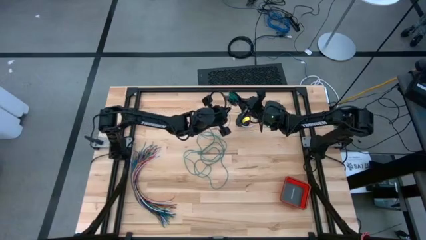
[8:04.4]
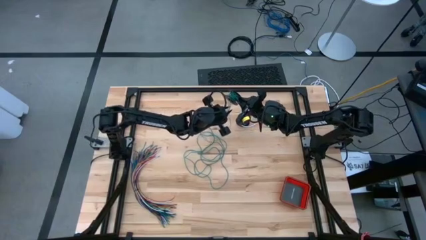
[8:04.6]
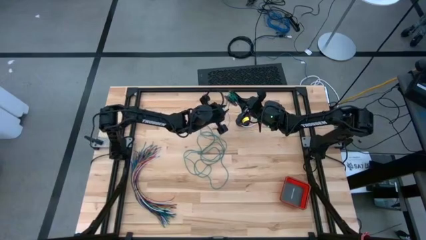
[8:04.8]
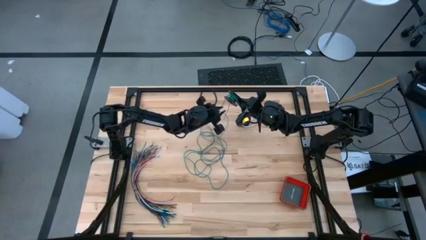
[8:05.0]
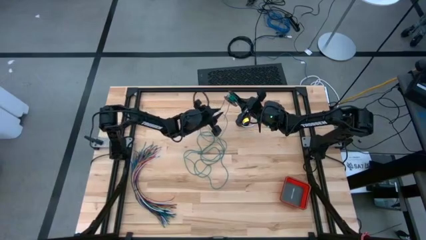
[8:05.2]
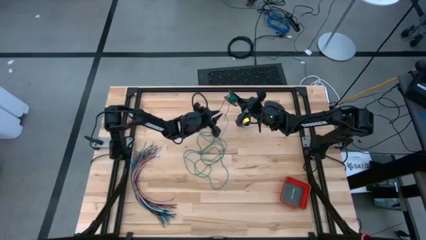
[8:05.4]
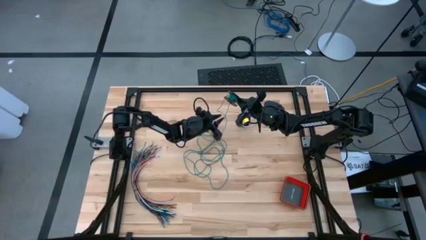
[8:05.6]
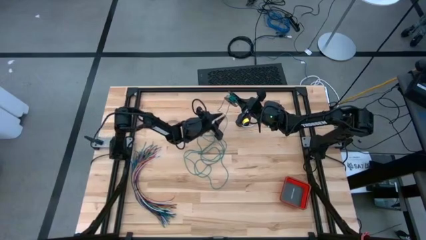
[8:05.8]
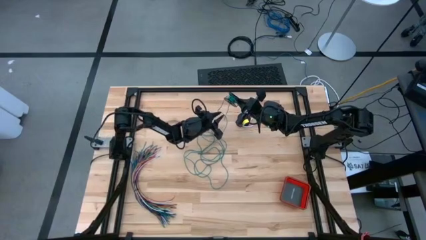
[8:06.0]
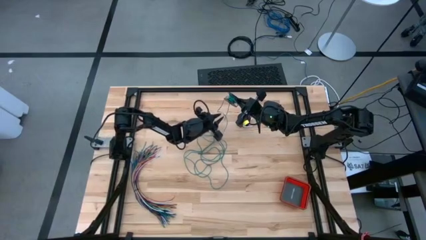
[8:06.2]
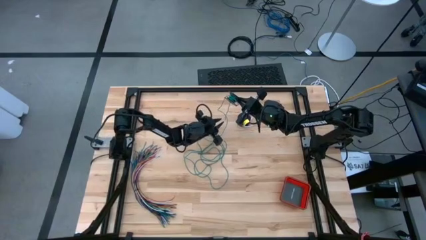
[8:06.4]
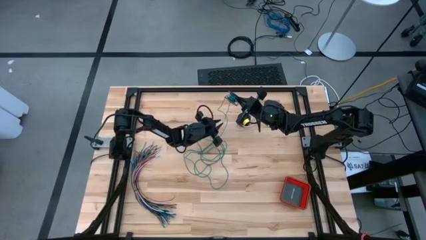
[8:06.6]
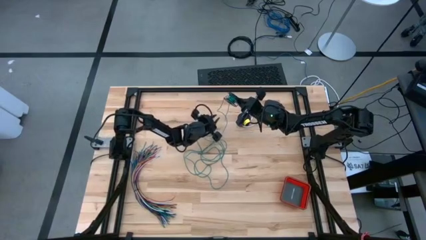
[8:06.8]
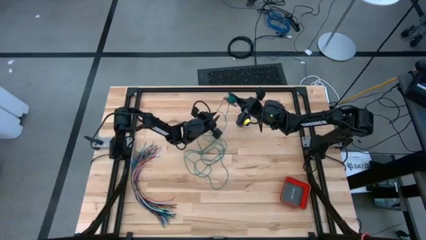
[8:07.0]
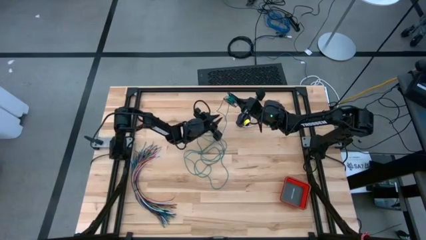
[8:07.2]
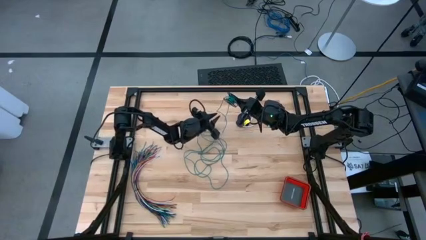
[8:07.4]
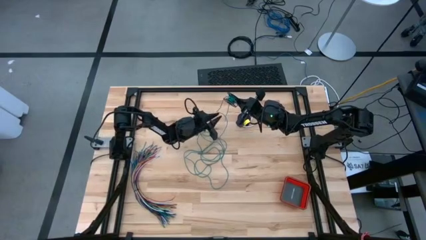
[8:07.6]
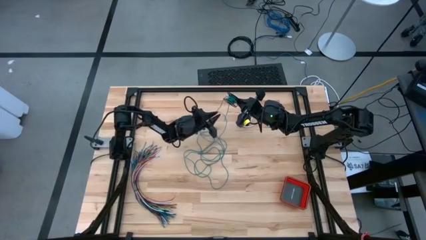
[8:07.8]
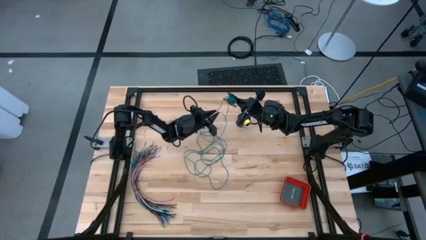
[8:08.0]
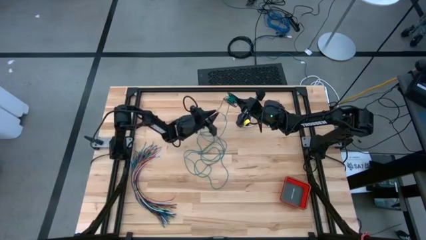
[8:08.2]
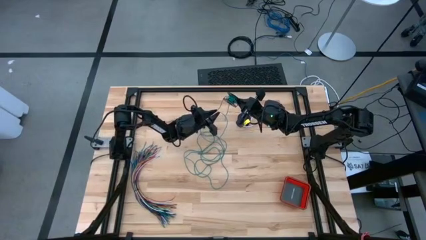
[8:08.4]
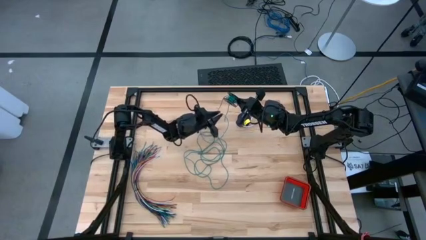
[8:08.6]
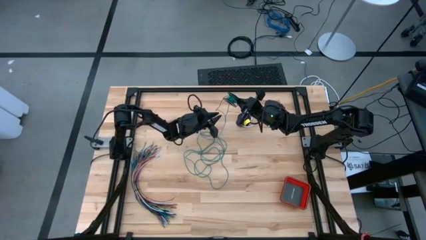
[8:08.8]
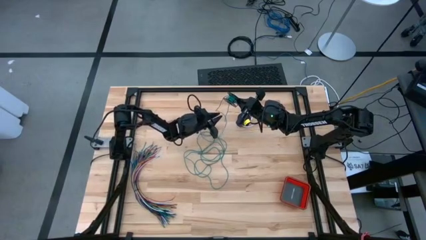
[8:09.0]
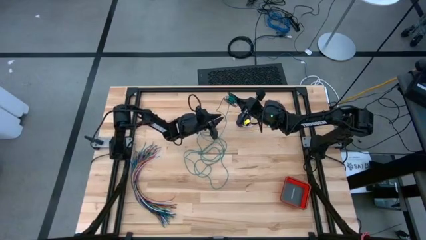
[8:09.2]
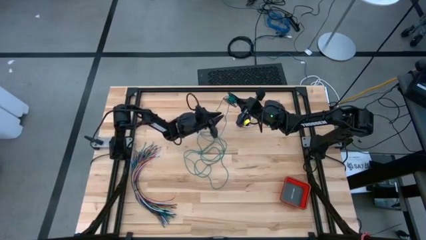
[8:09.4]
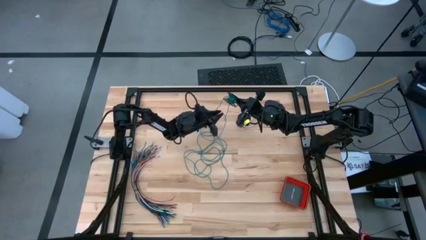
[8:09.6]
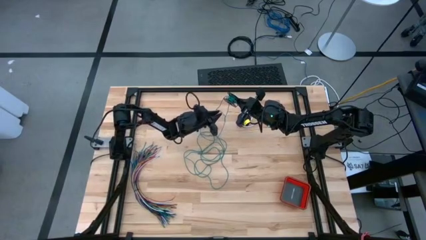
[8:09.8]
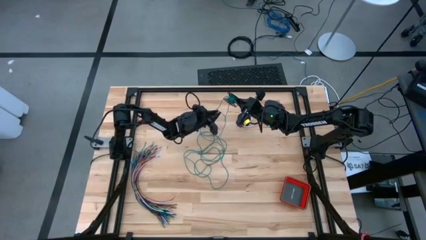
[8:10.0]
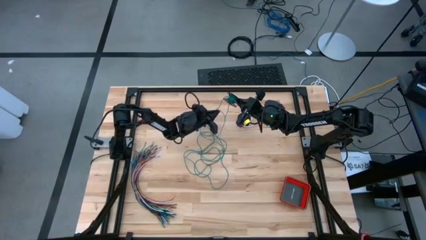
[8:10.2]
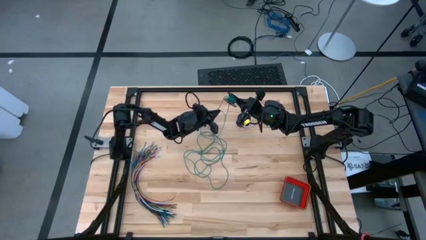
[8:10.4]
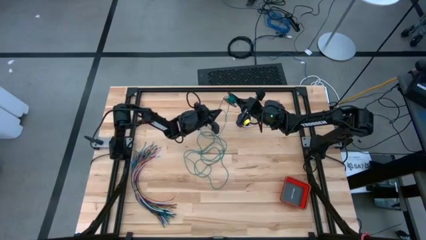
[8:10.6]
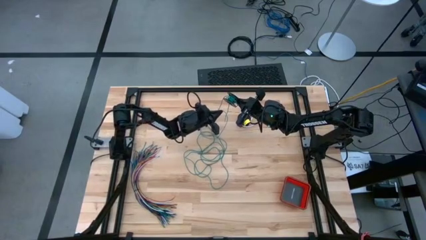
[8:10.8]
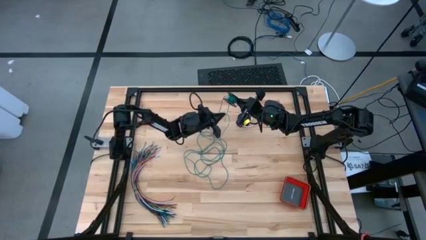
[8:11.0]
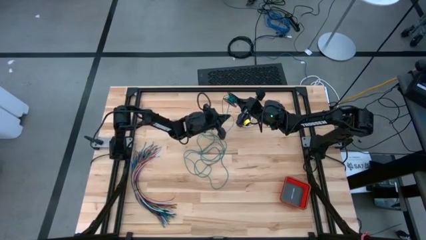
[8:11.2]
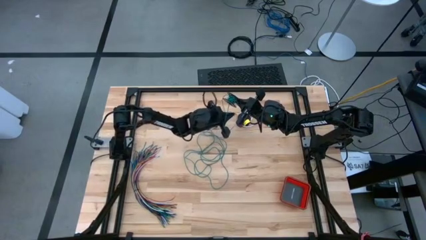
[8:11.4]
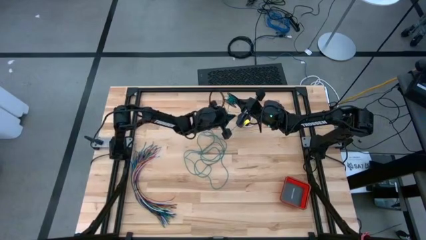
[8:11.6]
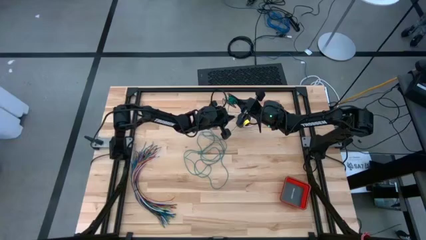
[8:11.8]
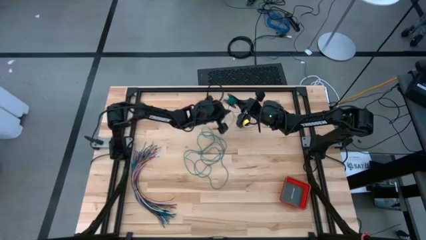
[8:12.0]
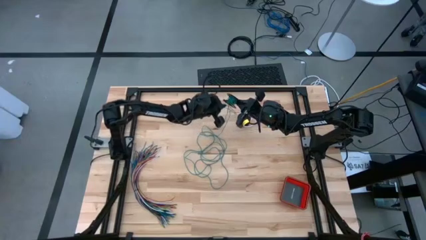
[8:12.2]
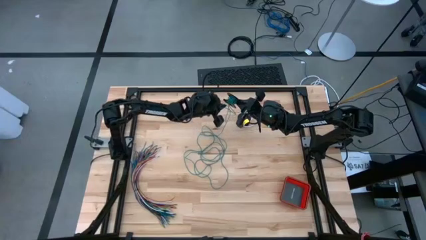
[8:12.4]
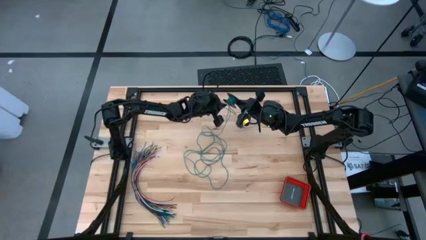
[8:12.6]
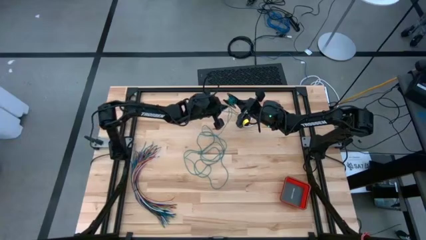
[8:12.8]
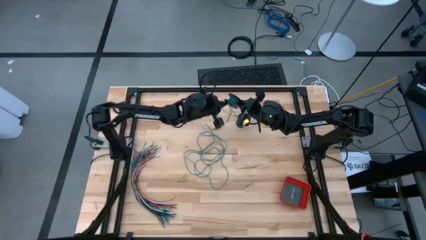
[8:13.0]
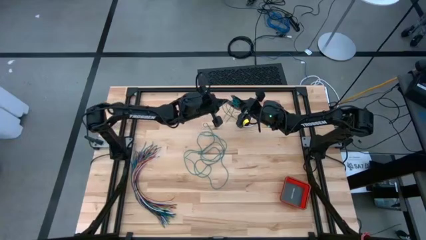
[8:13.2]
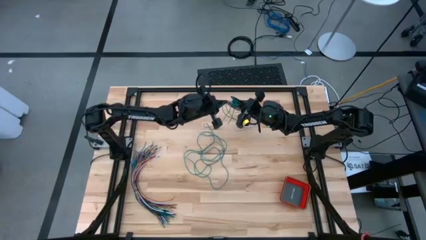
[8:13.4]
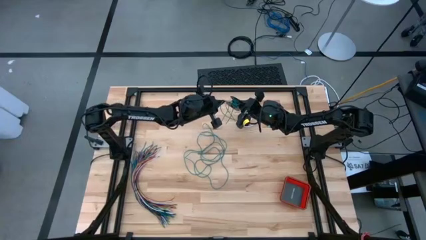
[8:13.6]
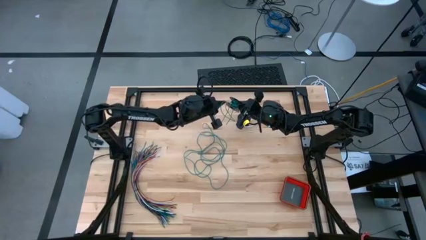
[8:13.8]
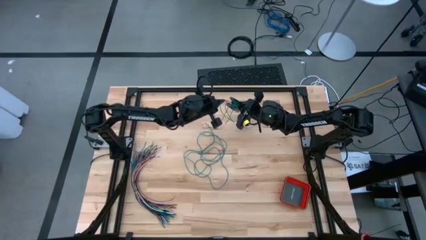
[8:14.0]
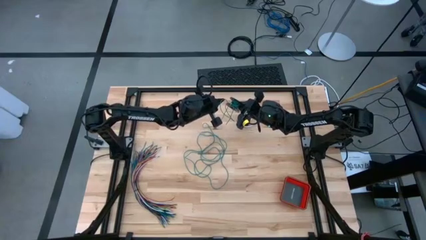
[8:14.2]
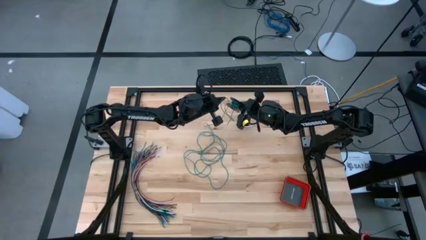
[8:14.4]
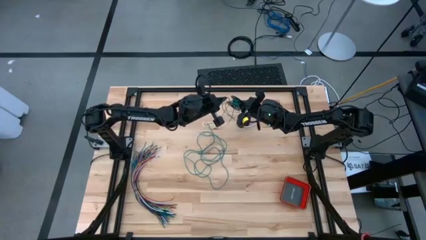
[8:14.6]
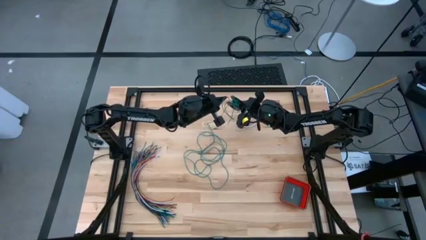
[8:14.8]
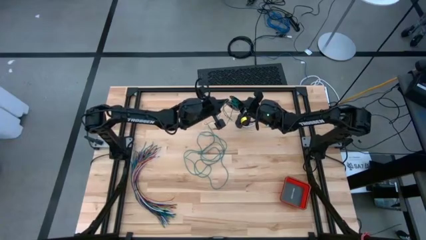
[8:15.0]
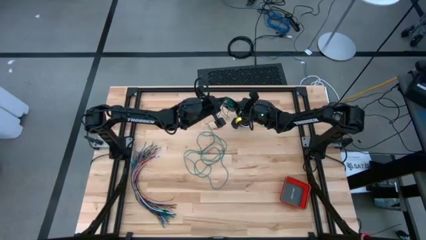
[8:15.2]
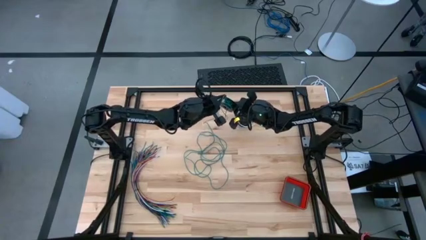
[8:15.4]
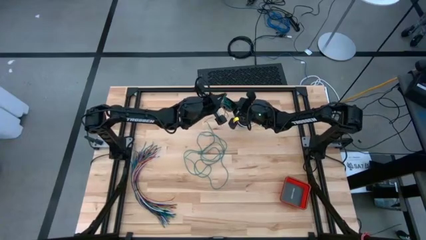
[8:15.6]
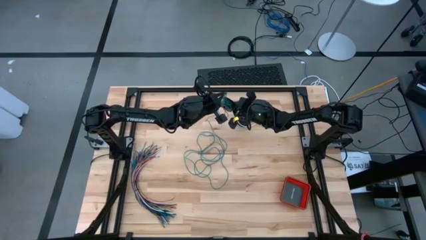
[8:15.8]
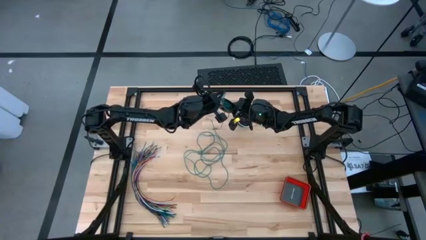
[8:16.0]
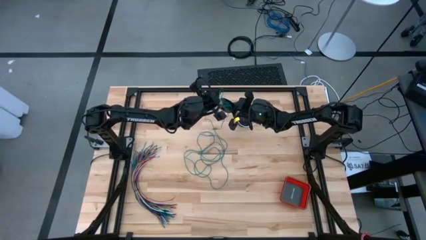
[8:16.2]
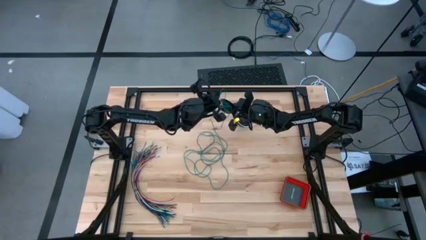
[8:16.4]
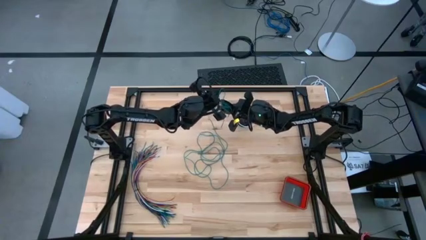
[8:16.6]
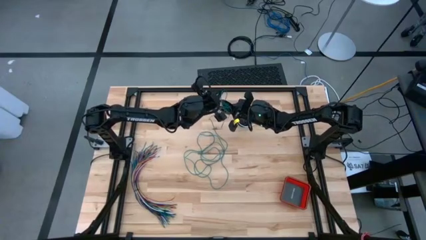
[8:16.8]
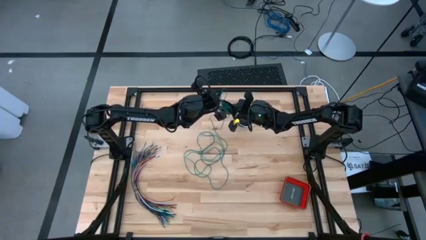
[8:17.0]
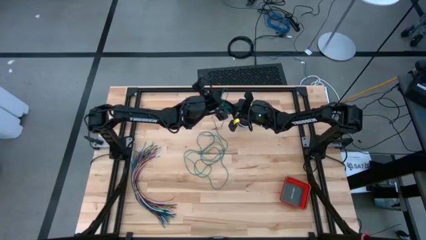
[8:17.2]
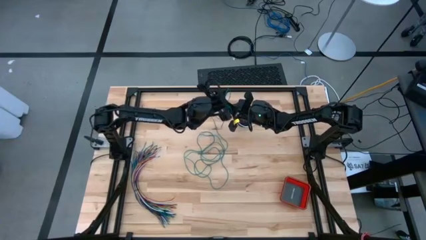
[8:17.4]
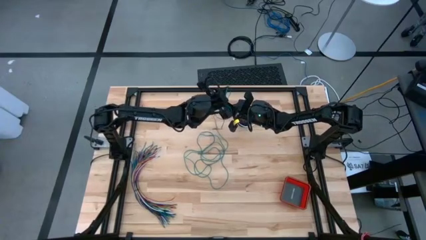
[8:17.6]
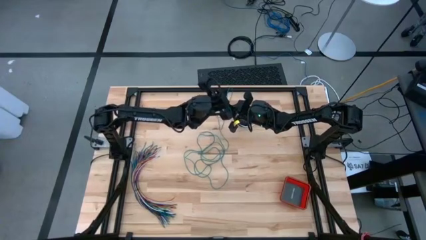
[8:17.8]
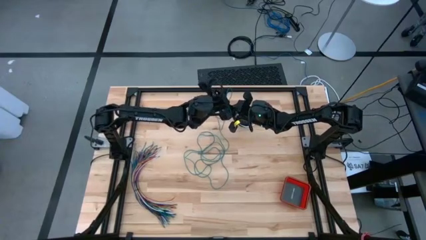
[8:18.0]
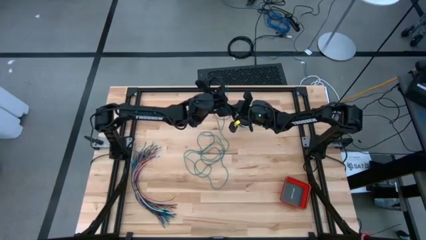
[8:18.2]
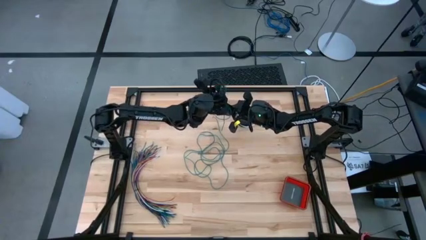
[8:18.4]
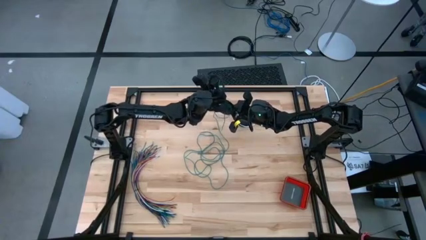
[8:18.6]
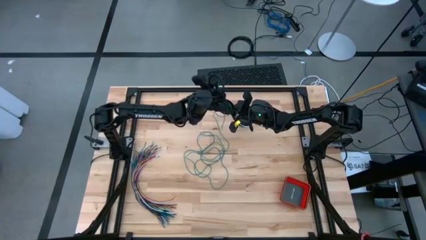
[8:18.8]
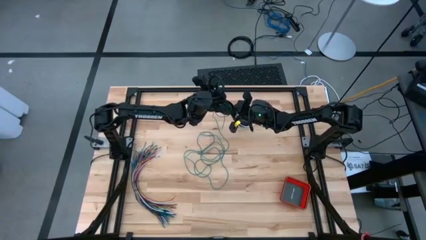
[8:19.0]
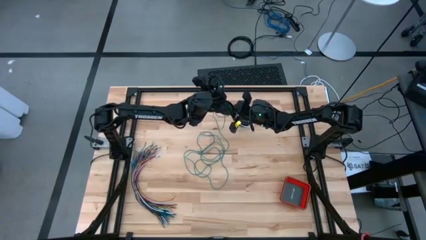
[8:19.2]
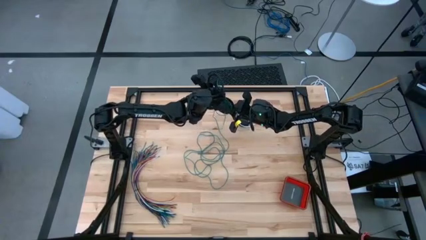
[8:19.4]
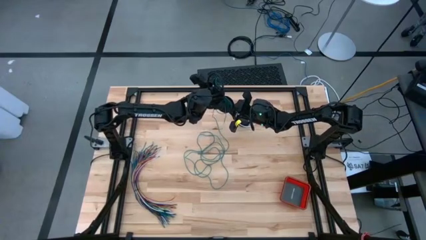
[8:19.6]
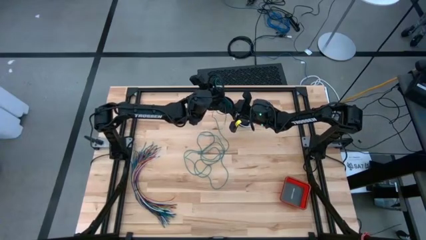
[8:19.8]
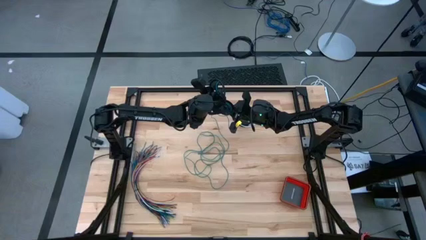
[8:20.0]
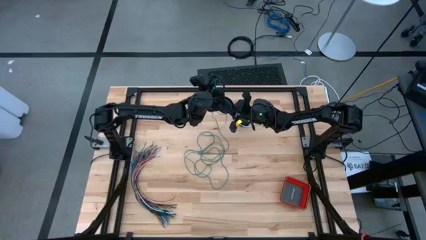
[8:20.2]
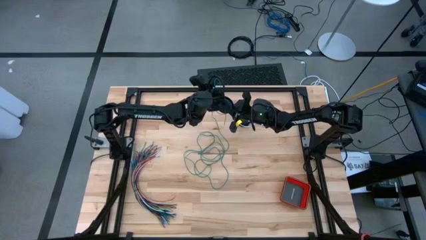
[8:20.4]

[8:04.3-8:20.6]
Task: Coil cords
Coil the green wire onto the spool
